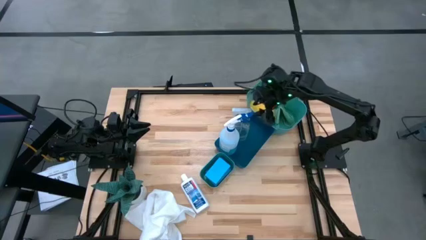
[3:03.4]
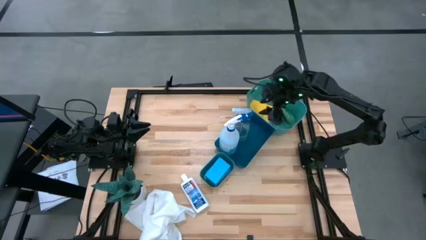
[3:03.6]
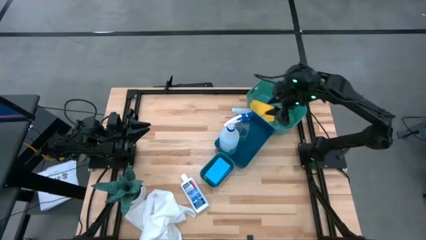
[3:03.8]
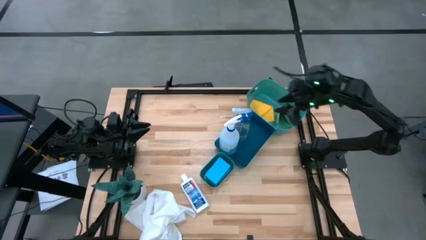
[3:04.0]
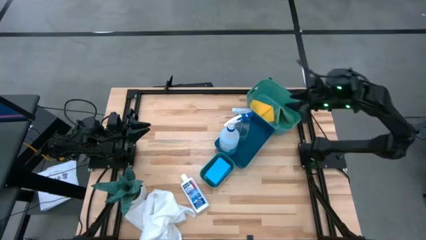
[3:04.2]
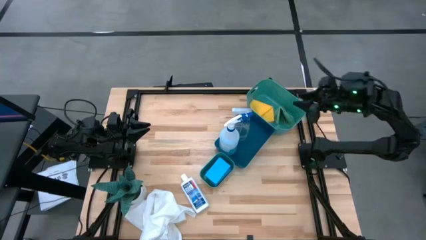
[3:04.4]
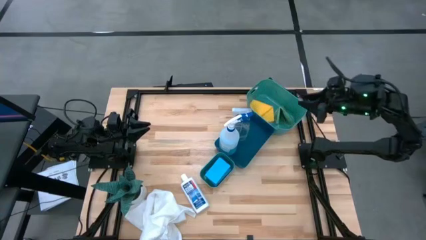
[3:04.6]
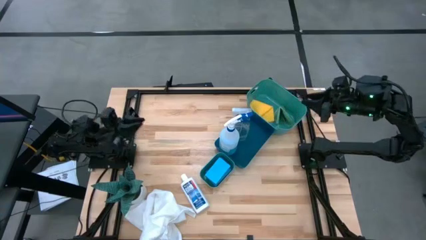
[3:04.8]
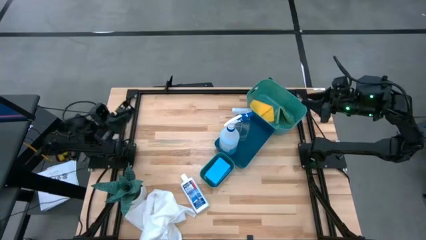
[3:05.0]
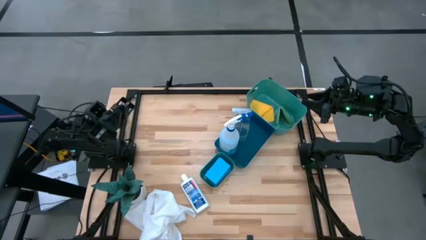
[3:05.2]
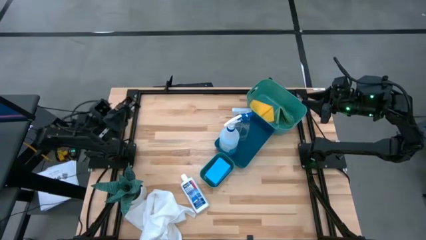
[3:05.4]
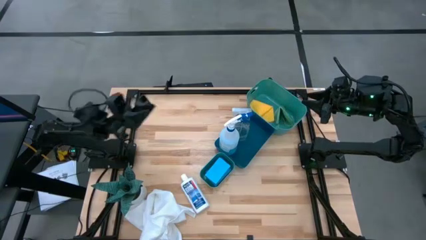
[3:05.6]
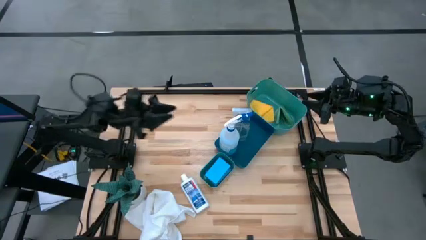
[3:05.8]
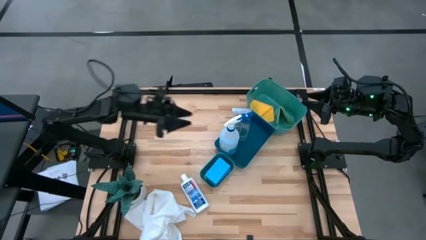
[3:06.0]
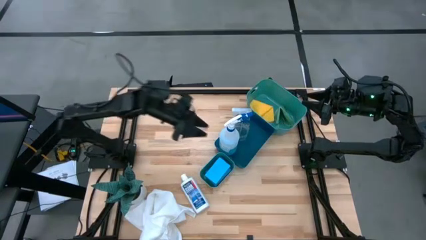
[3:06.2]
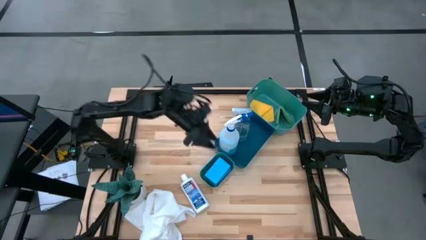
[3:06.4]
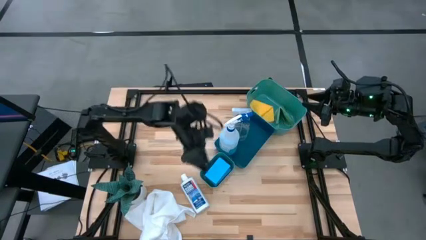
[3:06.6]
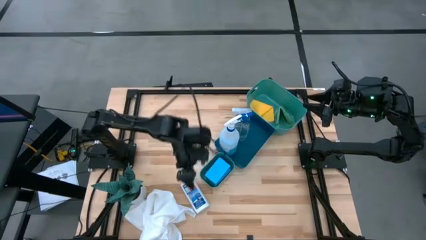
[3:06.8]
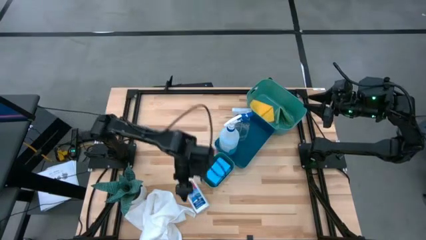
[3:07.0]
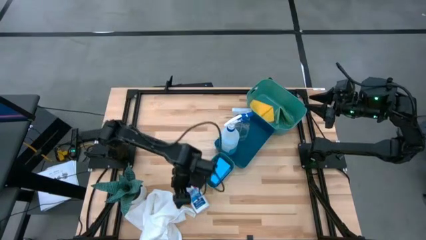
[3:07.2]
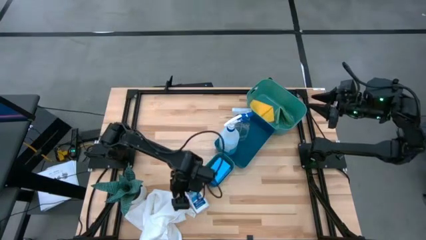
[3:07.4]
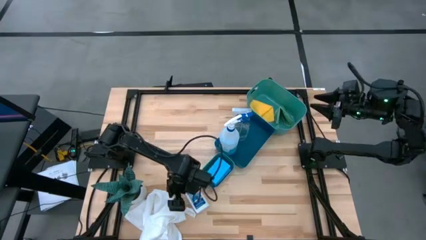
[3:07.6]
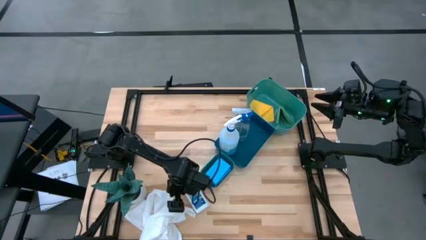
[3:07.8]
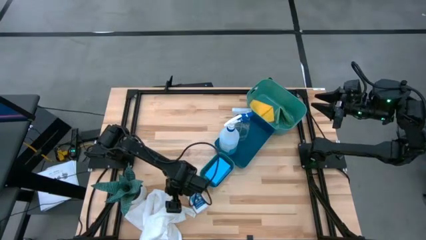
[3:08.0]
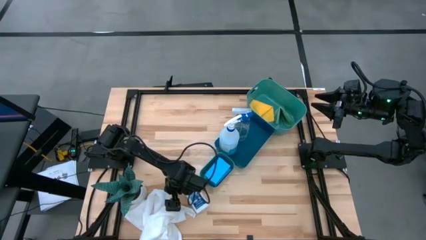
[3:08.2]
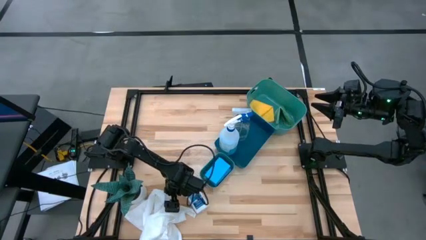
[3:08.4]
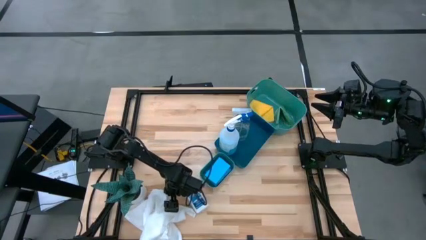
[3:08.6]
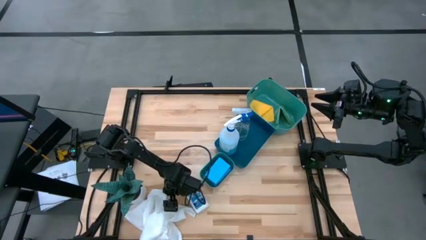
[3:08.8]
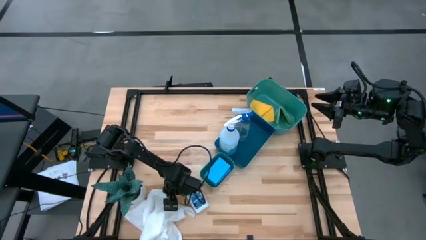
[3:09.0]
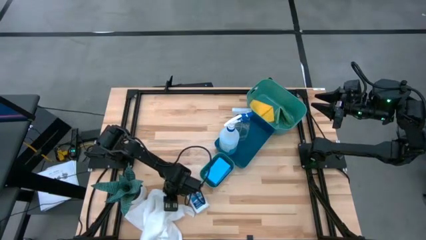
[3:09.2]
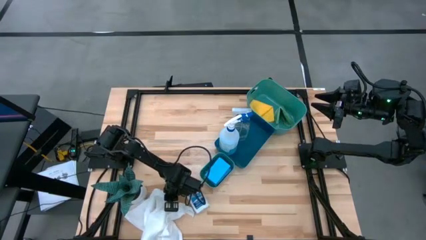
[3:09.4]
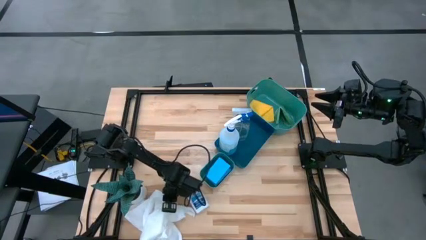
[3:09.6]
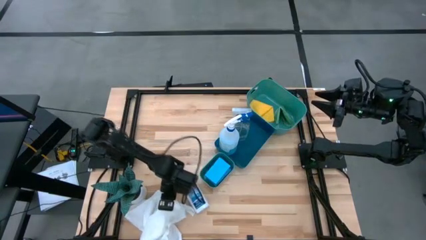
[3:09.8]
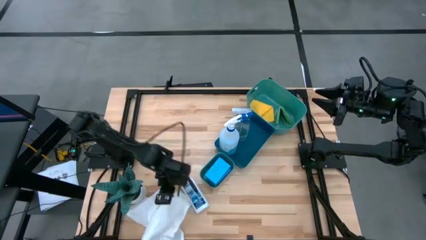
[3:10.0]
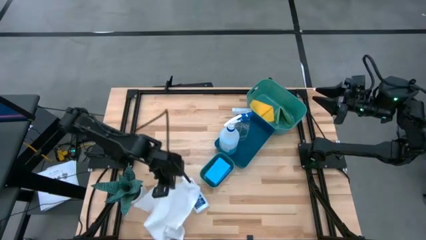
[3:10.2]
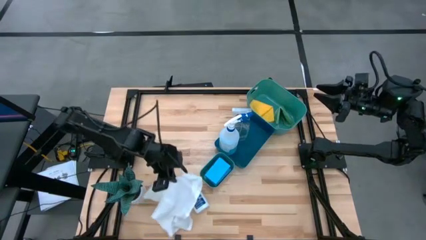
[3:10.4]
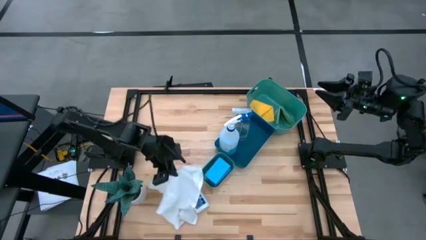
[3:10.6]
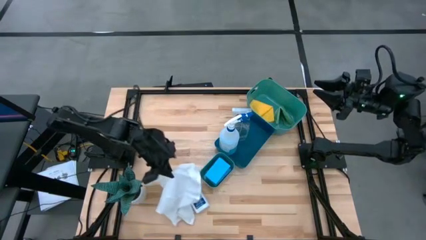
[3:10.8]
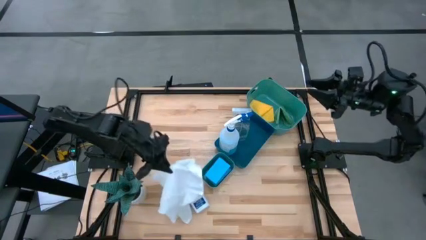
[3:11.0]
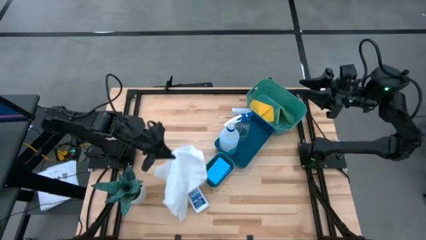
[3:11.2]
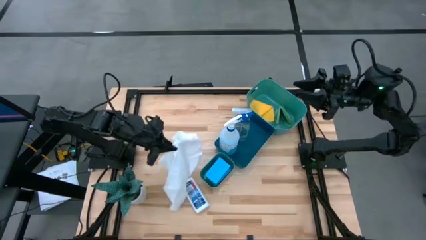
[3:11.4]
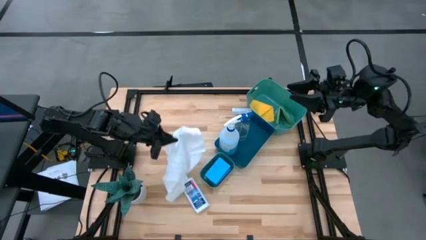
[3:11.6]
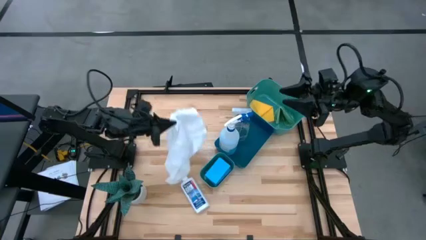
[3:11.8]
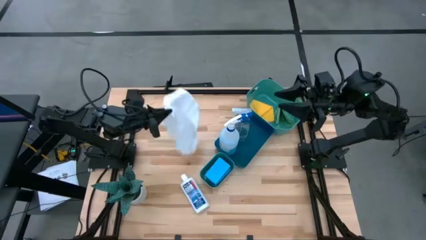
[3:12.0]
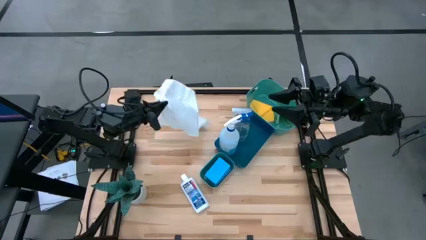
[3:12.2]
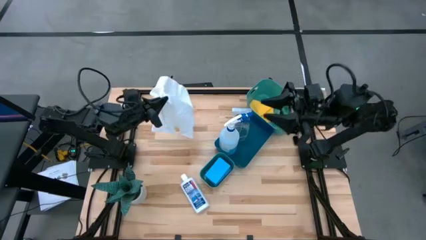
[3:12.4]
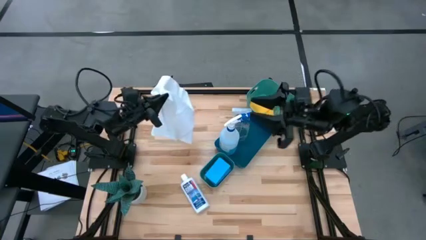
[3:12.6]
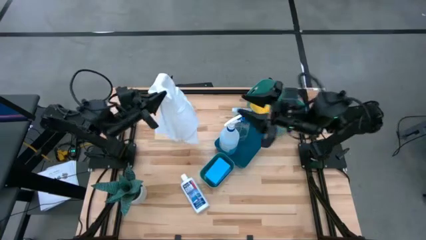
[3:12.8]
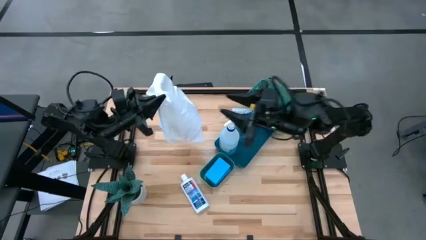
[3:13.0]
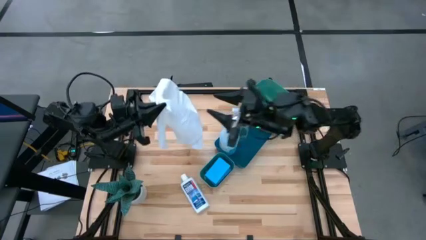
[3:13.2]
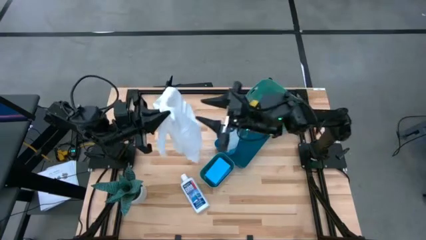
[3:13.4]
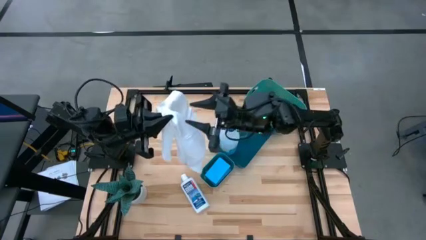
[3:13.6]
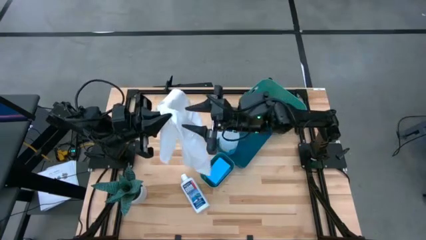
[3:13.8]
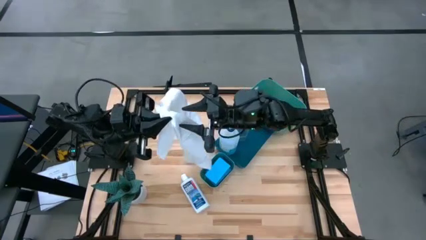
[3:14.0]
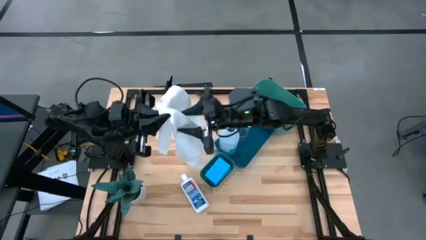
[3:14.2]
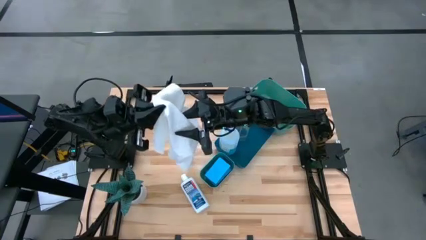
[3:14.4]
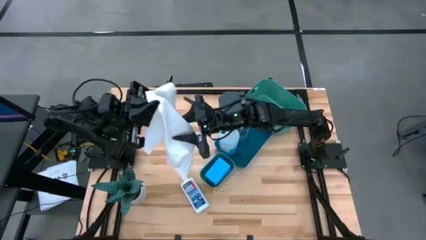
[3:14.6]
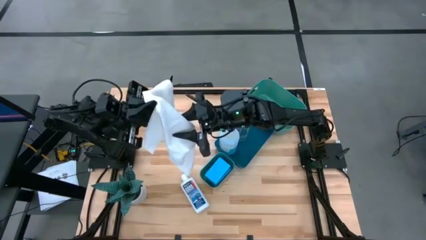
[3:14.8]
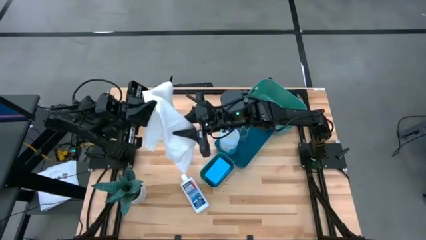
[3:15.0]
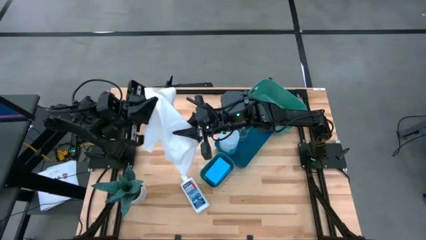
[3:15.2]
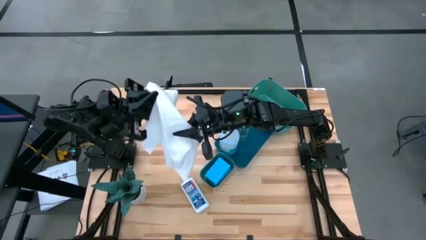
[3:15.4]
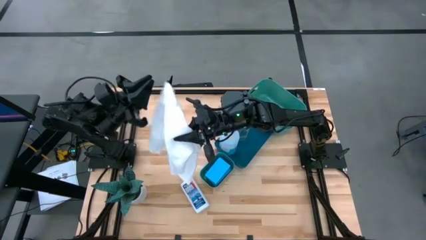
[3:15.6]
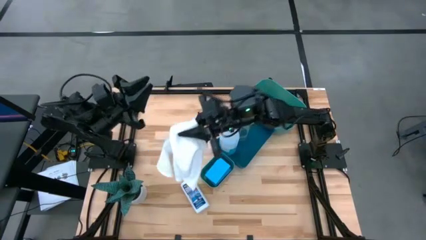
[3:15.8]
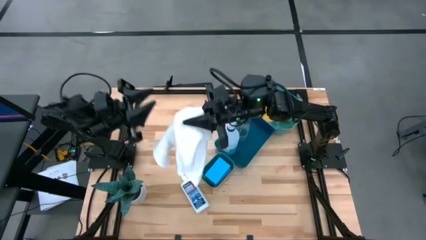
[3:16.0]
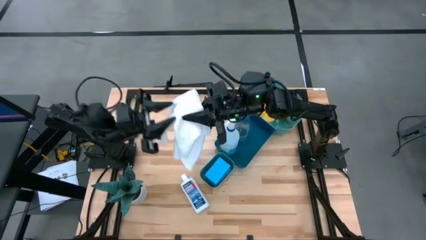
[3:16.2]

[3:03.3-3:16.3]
Task: Pick & Place Kitchen Items
Put the white microfiber cloth into the top green bin

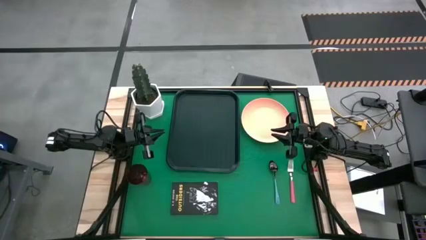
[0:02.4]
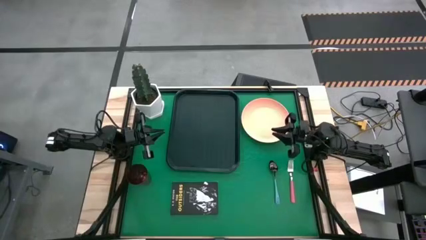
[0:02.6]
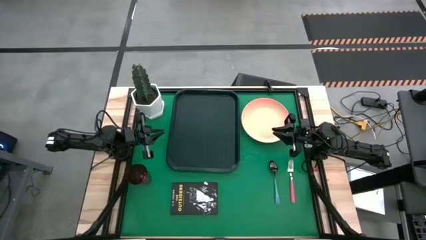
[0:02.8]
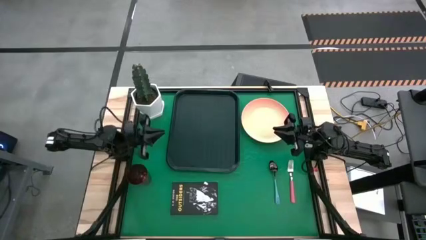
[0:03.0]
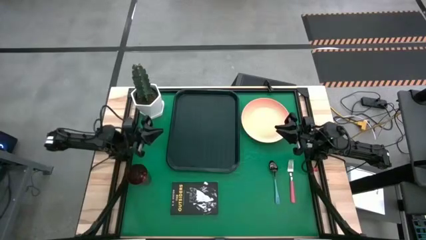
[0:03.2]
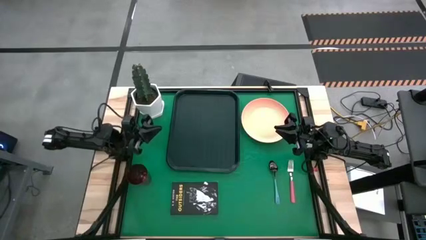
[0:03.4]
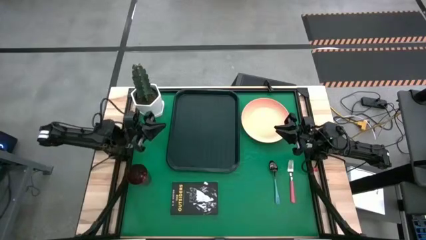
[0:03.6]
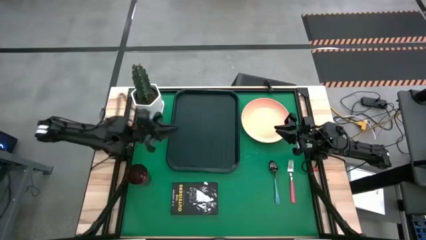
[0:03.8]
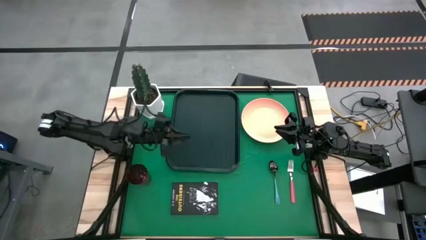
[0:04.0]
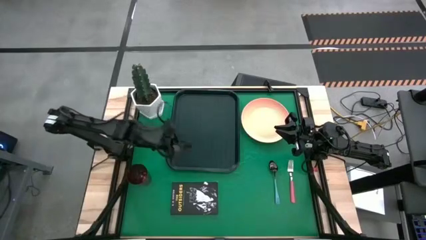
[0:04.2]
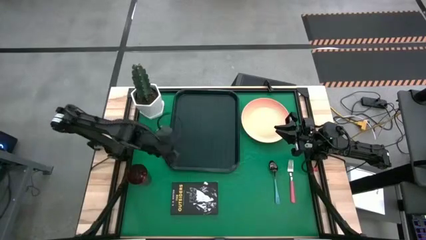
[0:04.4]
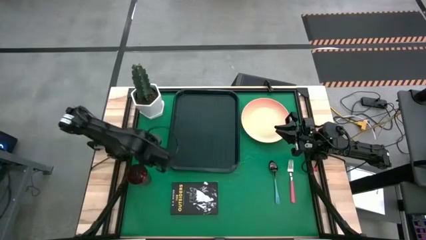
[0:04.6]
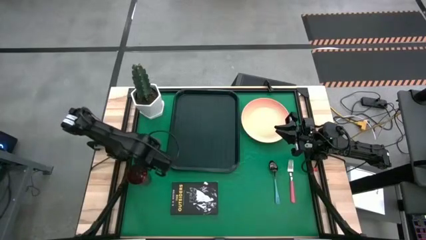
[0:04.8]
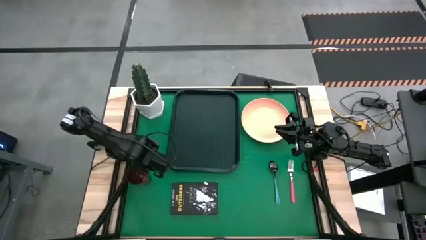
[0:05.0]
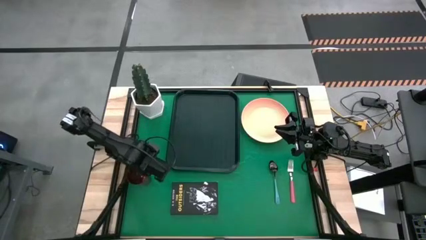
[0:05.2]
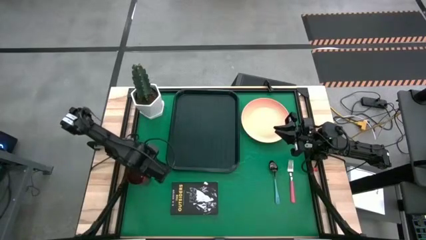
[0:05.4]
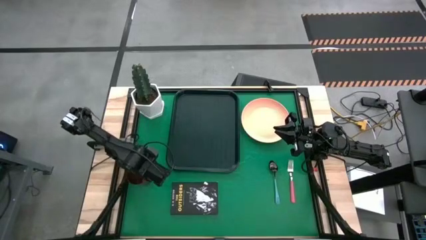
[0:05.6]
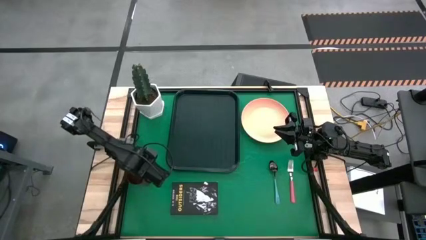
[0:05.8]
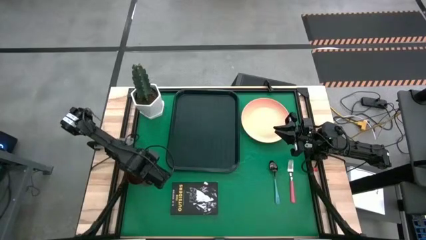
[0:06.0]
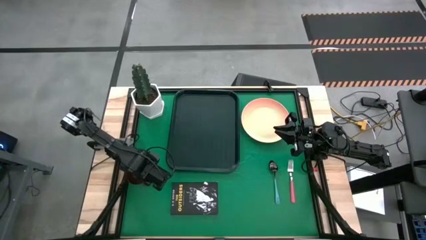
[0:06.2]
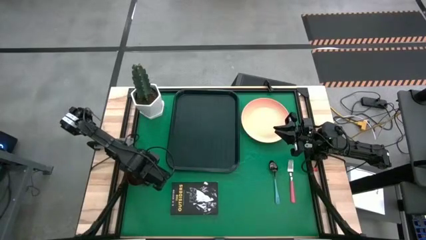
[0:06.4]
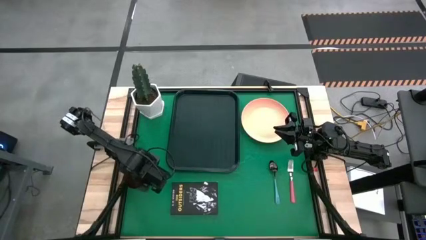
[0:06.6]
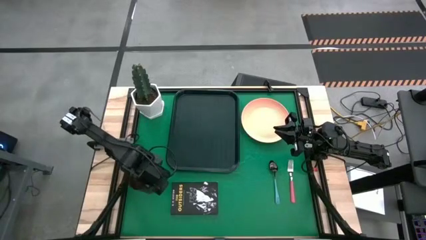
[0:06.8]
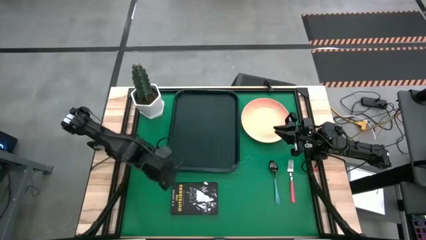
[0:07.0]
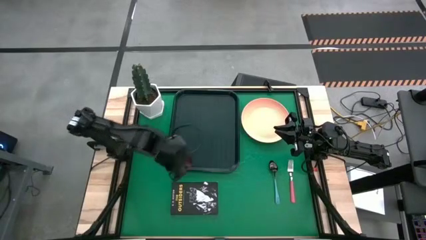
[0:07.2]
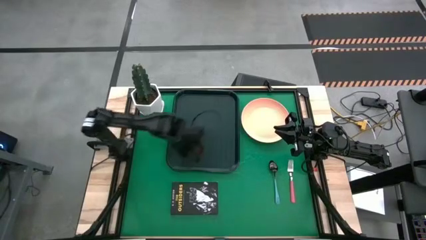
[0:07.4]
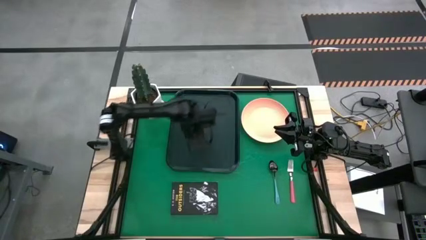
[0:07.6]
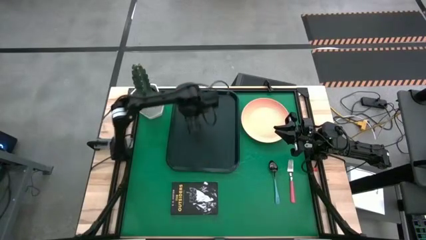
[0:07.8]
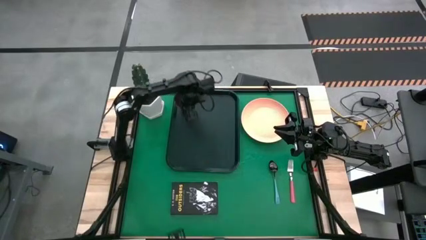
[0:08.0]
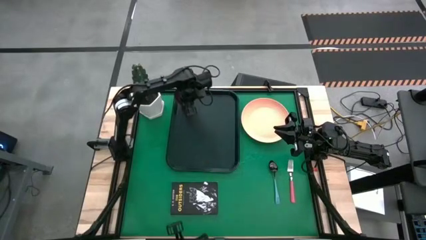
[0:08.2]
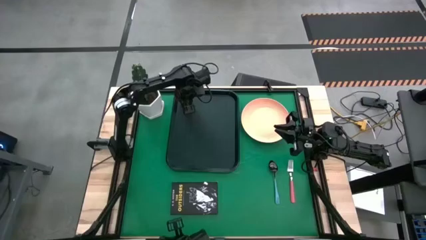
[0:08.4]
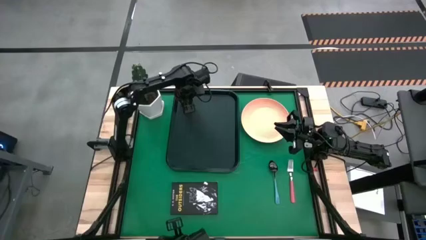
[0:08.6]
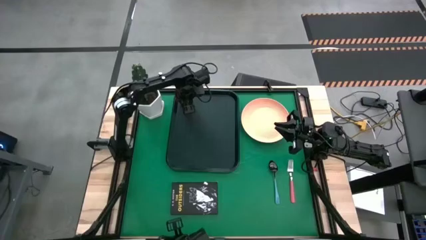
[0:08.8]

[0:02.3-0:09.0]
Task: Pick and place plate/cup/fork/spoon on tray
Put the red glass on the black tray
